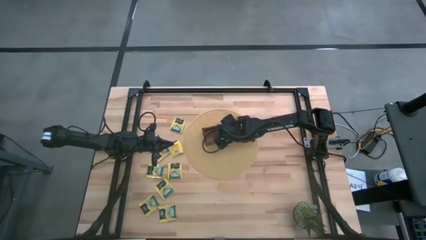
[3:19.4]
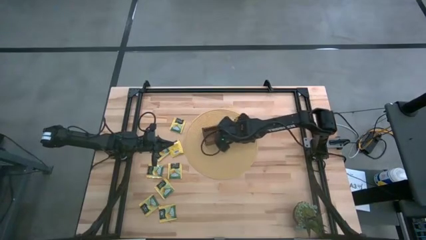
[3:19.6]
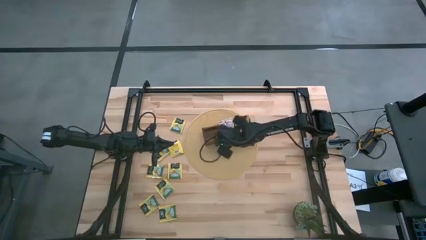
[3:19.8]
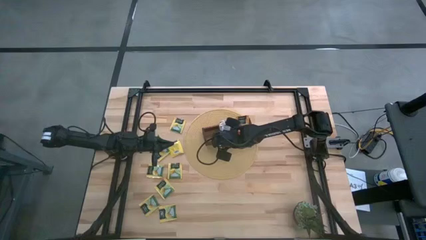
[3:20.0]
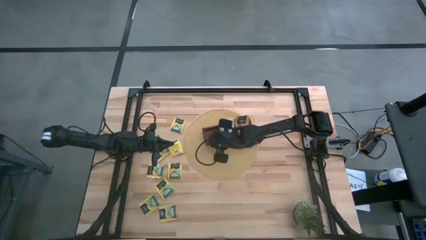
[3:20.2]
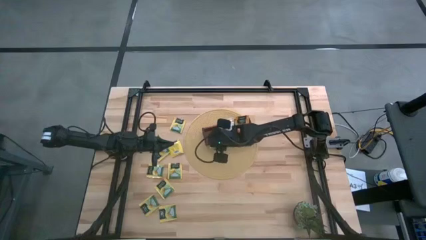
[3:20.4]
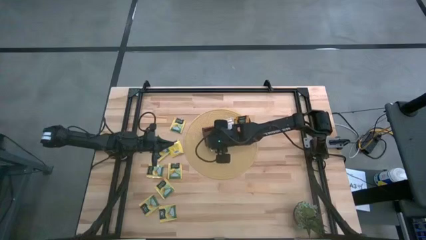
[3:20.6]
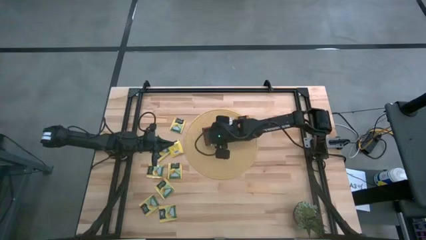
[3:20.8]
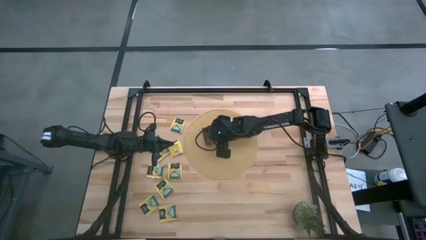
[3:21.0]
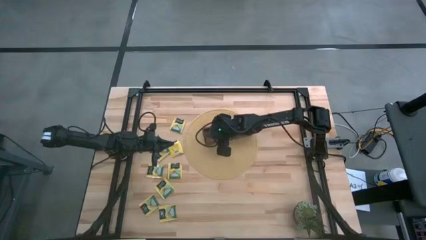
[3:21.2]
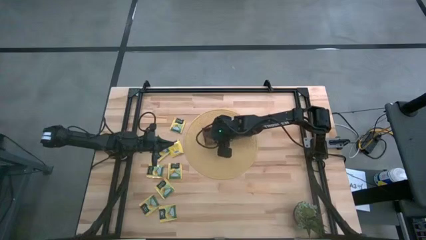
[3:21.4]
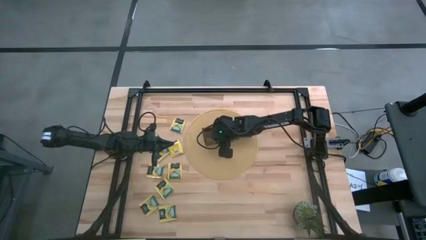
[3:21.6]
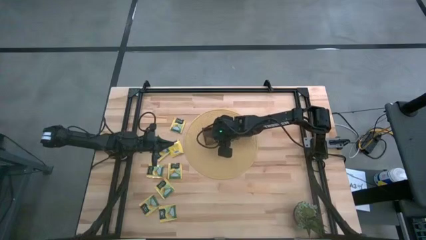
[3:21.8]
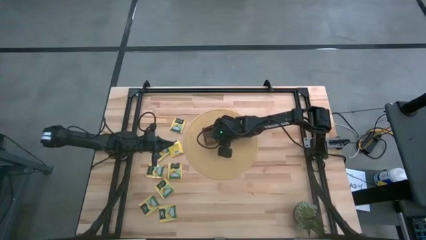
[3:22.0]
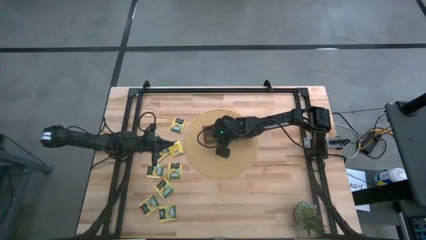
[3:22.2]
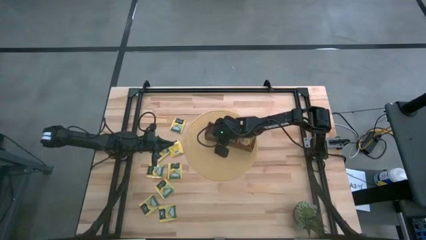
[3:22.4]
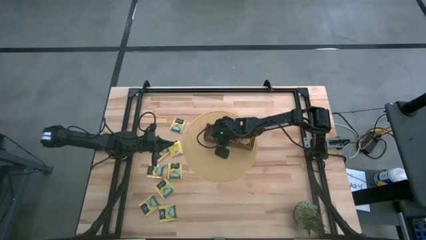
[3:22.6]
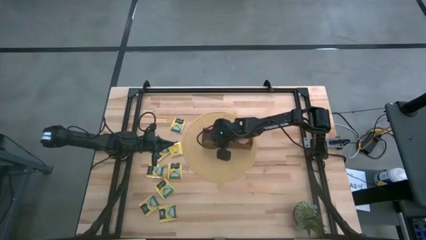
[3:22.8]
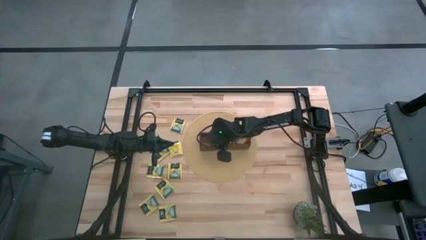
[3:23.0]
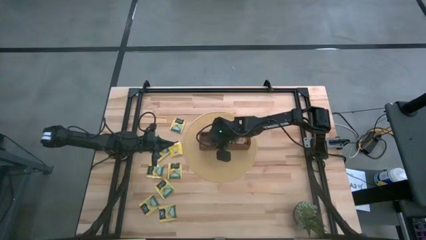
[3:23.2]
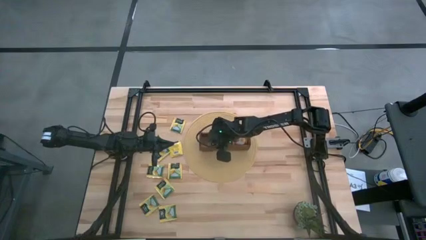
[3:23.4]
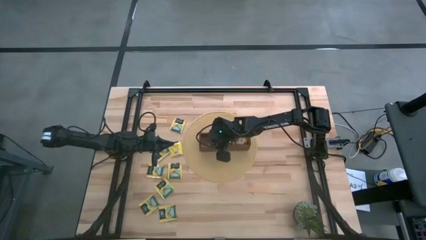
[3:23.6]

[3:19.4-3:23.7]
Task: Pick & Place Tea
Adjust the wooden organizer on the tablemat

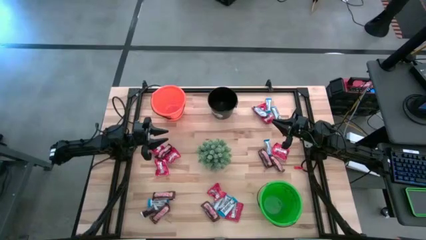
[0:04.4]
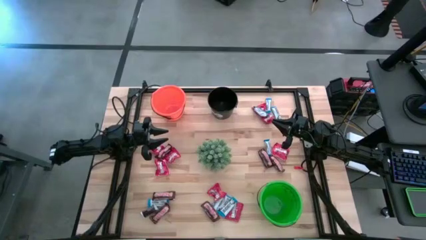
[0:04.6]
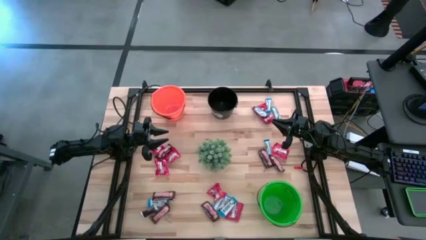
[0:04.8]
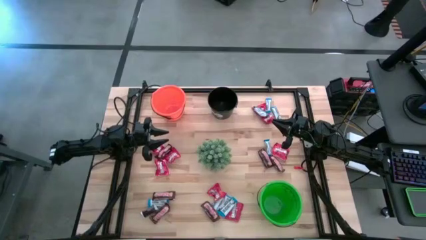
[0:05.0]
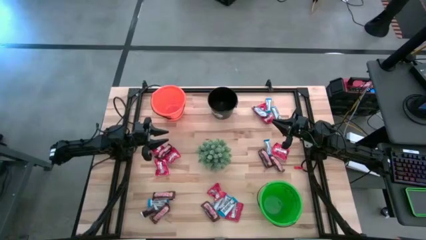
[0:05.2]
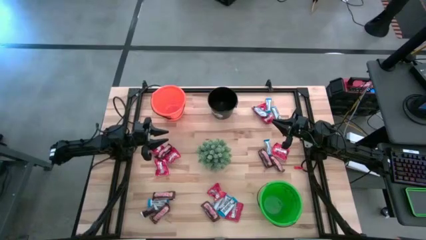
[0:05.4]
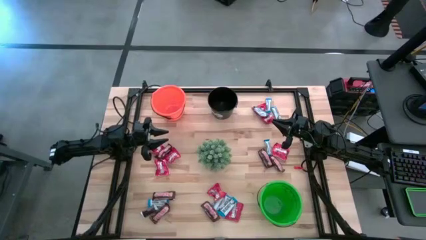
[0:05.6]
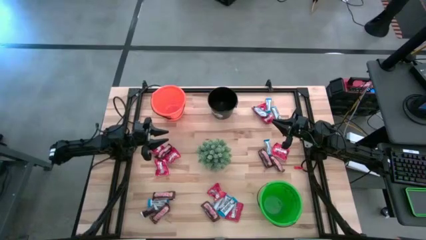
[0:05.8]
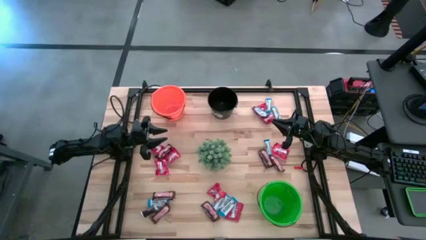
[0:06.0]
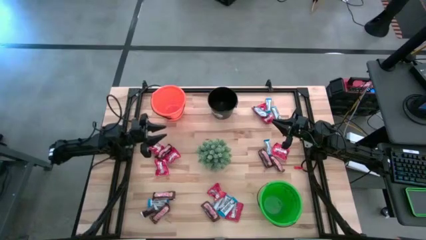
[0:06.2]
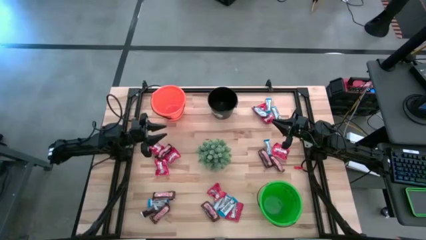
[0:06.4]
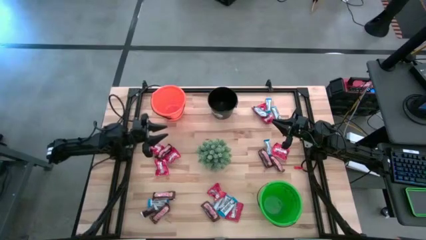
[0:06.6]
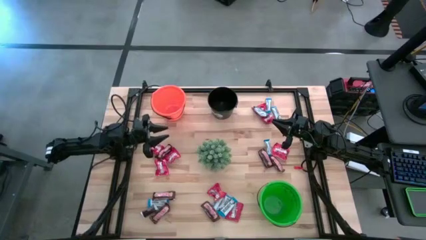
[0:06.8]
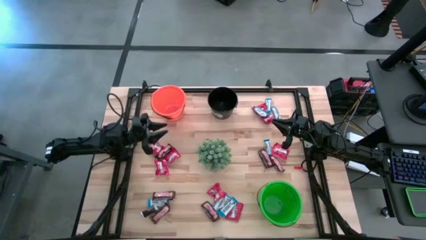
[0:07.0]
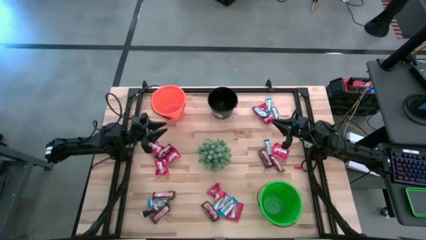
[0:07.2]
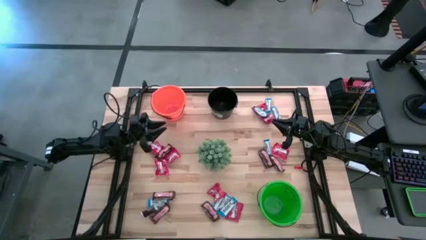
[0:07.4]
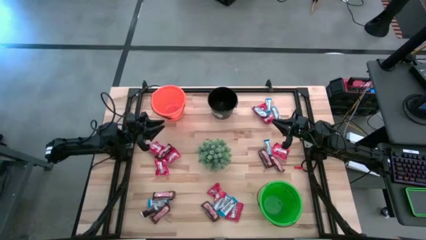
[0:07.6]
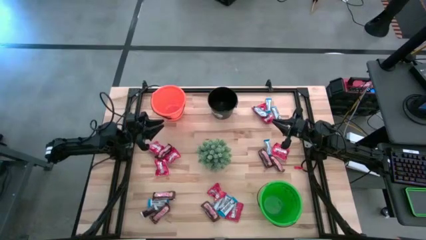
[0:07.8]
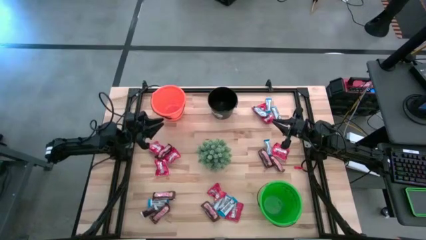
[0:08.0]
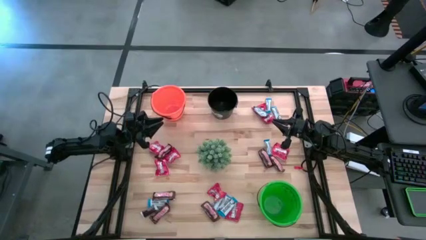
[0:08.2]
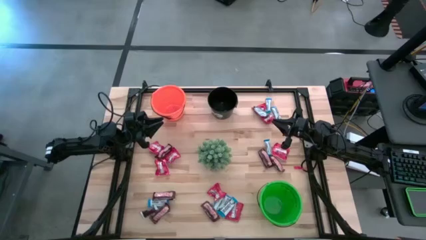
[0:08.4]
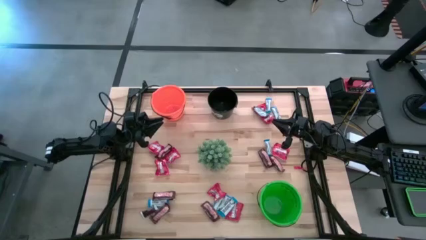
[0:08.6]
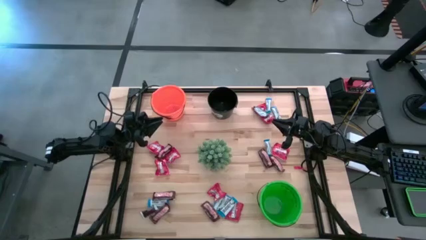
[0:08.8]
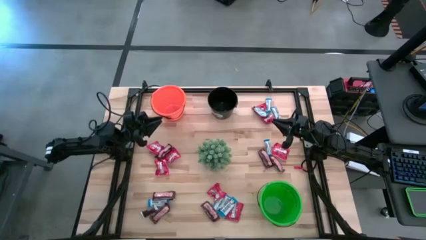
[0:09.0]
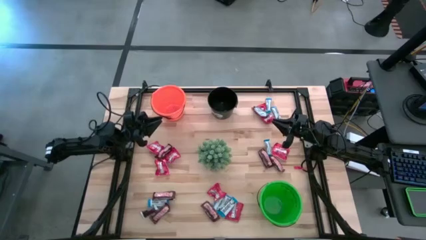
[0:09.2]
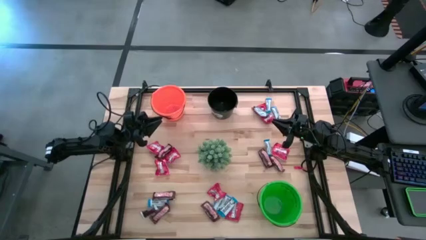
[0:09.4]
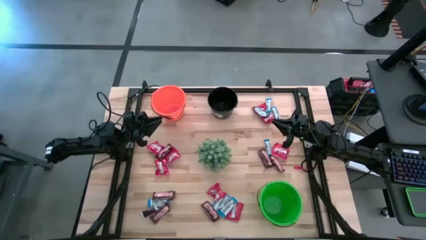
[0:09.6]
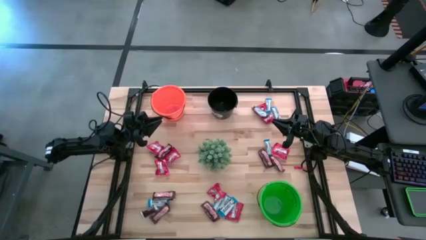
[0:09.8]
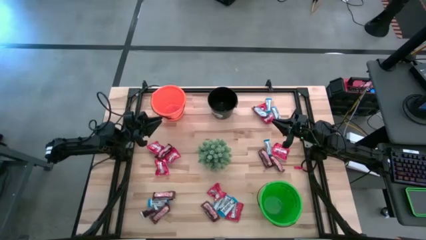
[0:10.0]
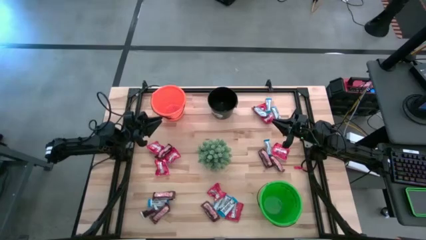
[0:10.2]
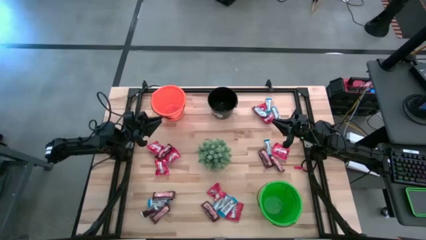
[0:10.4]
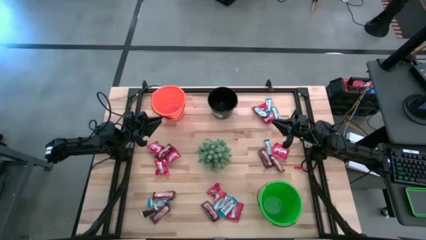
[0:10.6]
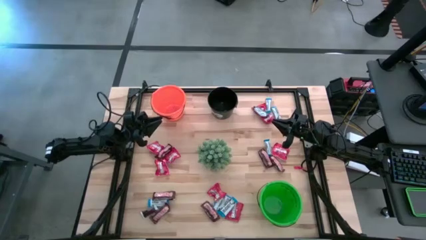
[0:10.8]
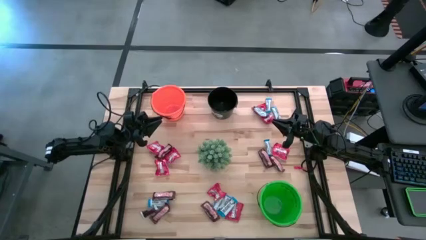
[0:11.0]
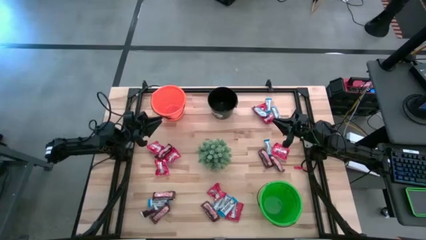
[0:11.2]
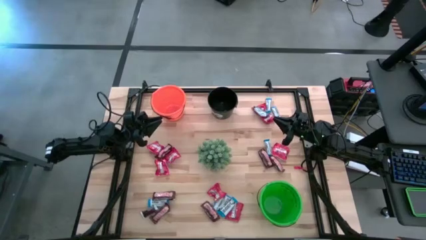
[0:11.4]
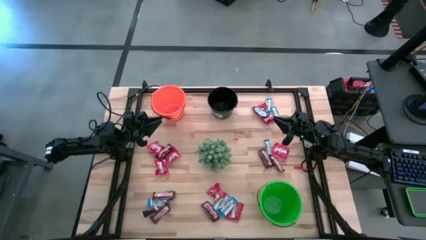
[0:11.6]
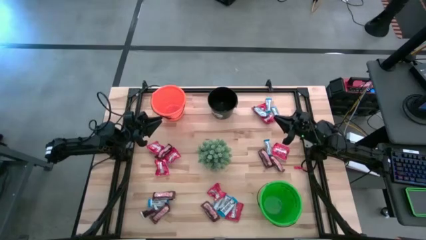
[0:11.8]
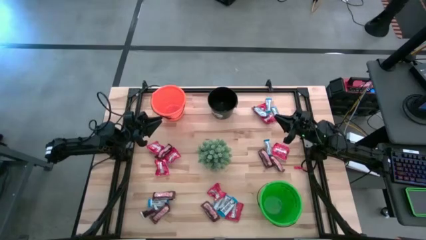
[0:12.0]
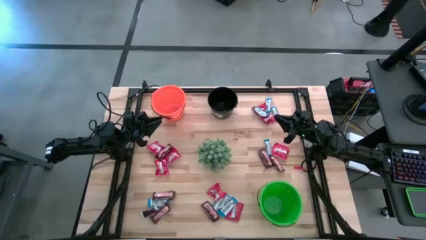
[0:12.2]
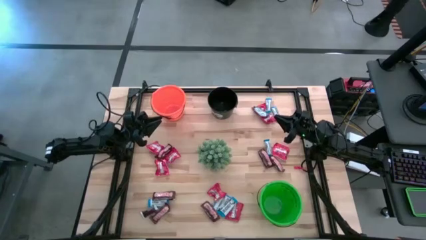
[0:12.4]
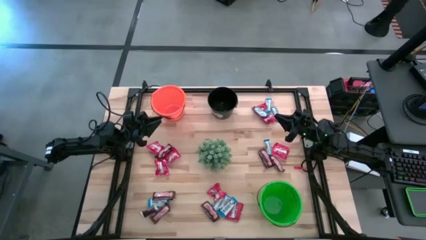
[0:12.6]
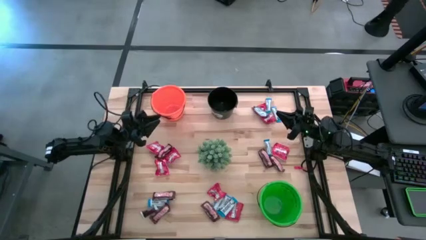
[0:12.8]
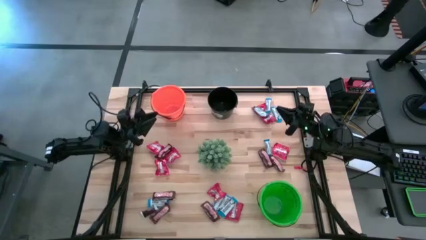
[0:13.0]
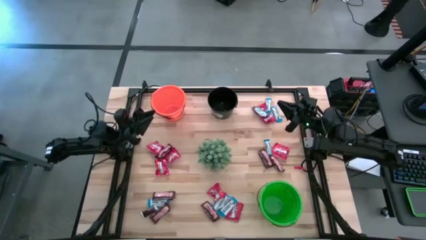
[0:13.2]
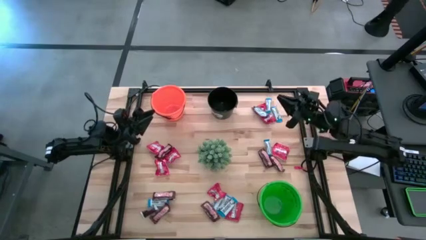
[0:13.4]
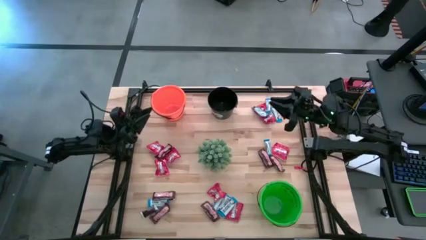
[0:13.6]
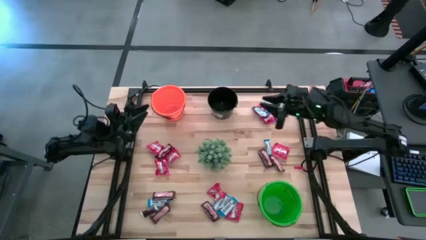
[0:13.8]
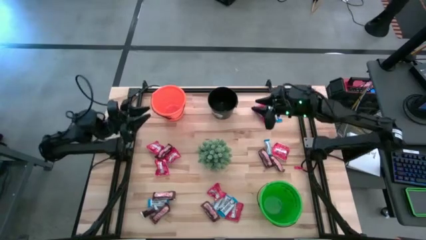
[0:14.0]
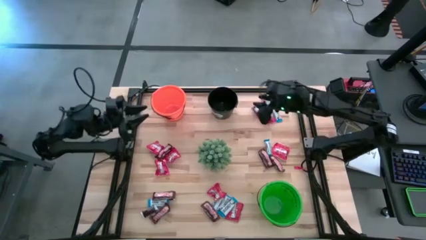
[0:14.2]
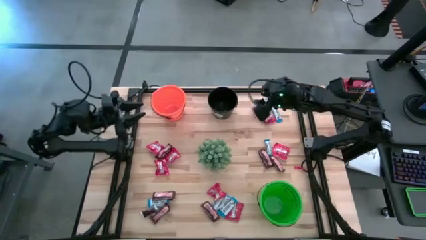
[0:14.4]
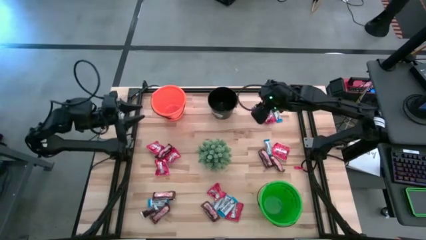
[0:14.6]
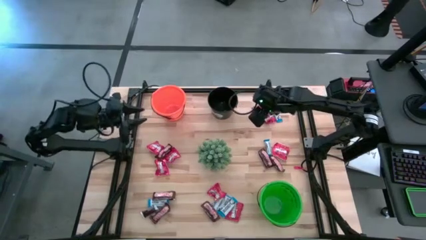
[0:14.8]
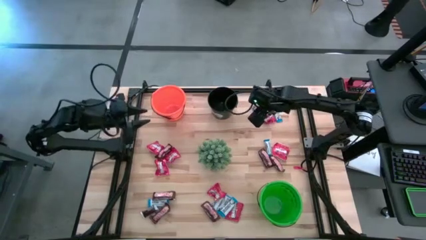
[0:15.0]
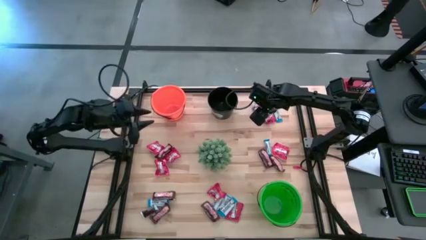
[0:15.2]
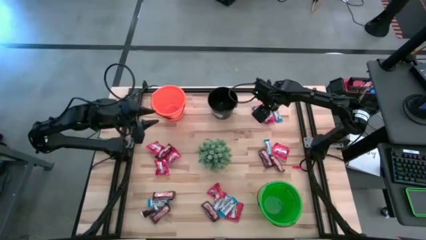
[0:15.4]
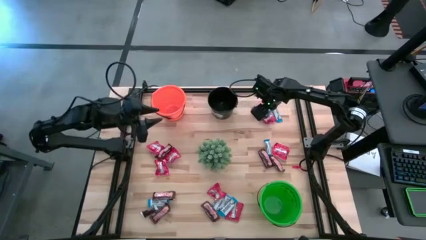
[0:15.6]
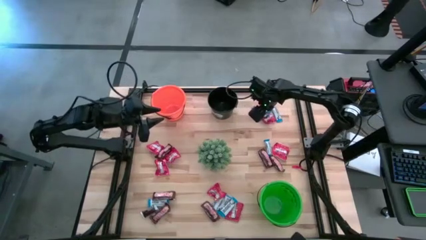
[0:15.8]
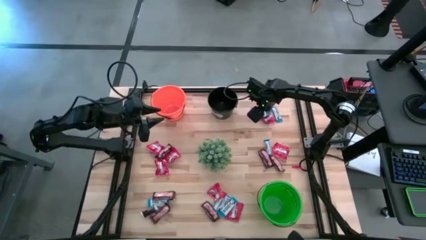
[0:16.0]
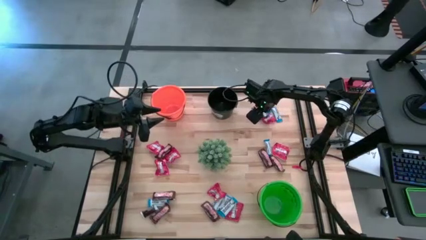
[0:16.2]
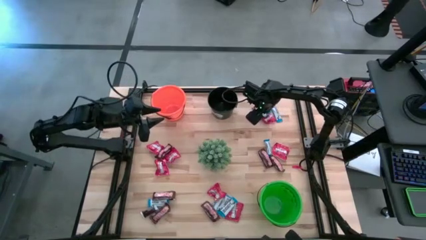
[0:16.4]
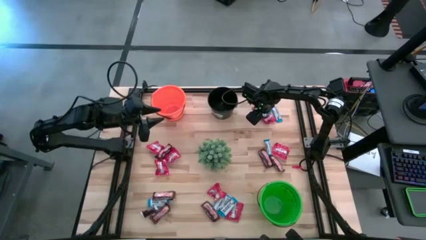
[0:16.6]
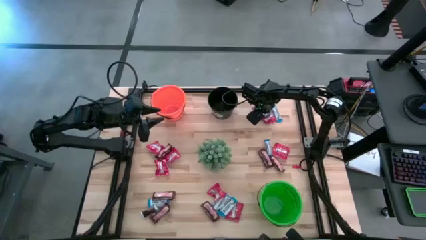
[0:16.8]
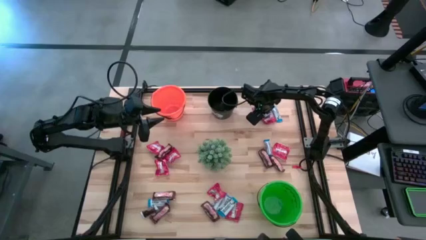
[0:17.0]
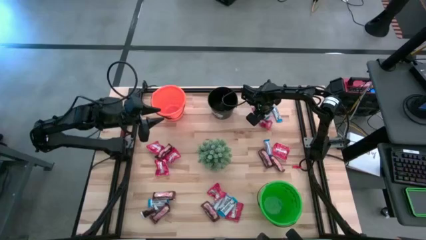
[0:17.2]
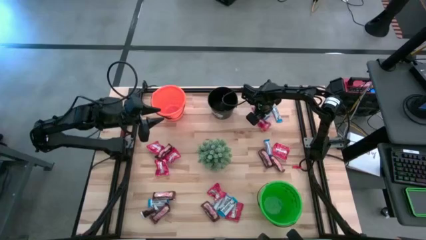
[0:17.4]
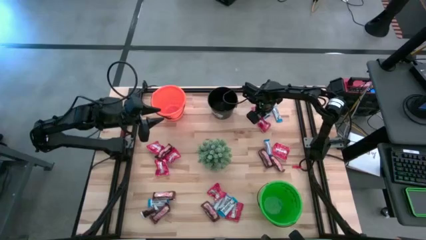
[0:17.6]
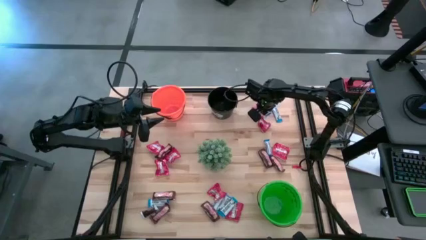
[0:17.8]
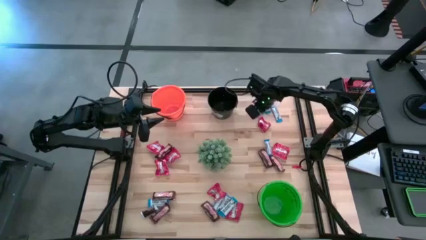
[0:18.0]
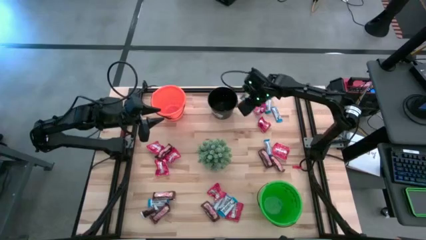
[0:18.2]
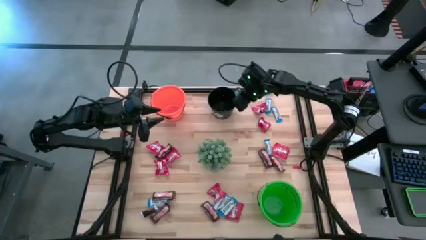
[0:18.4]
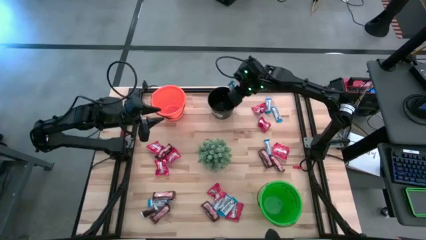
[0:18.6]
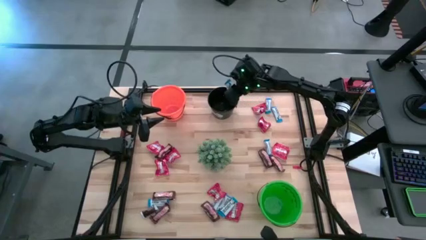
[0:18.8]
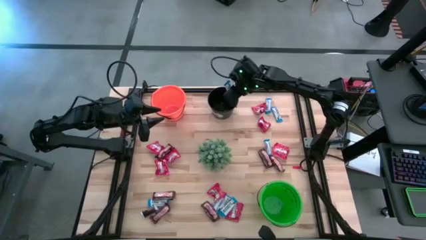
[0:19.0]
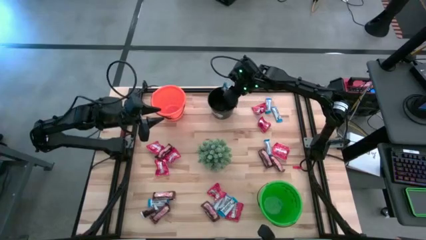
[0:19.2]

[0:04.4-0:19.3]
Task: Organize candy in baskets
Put the white chocolate bar into the black bucket
